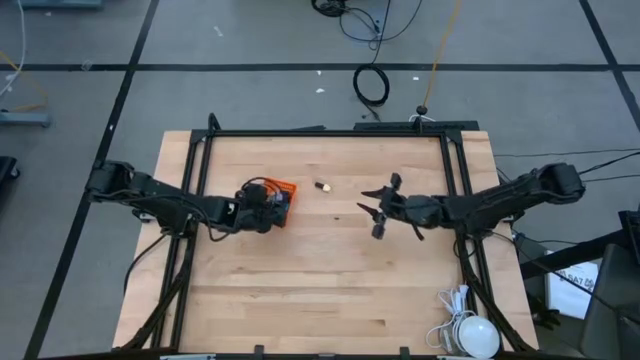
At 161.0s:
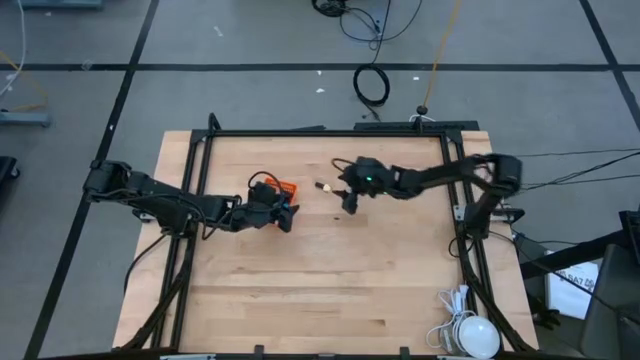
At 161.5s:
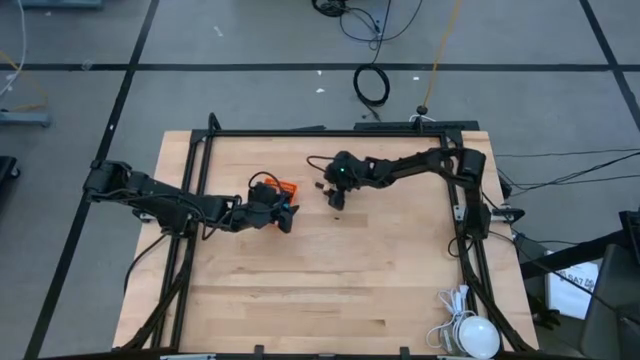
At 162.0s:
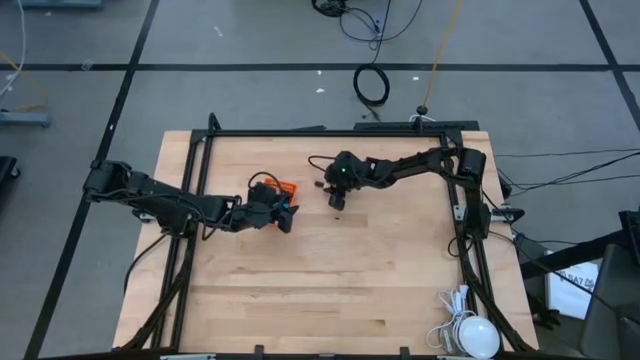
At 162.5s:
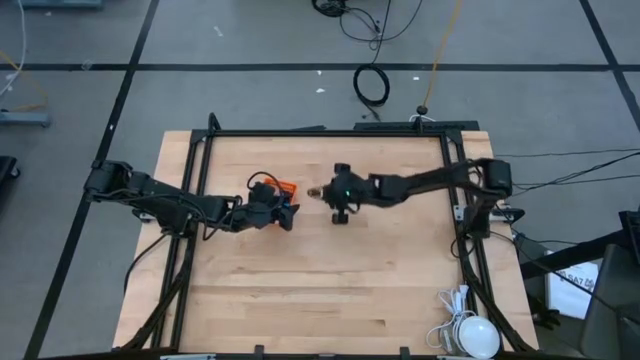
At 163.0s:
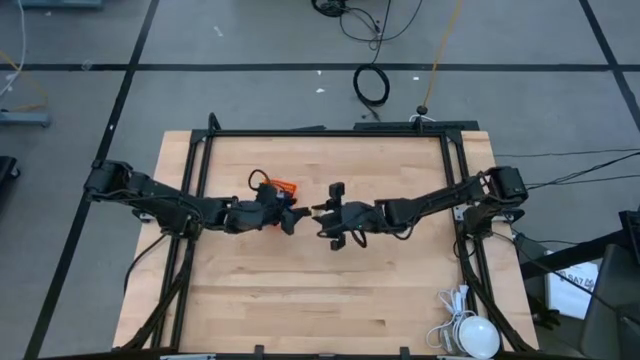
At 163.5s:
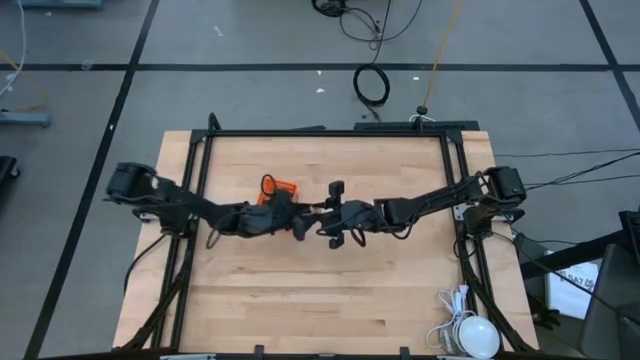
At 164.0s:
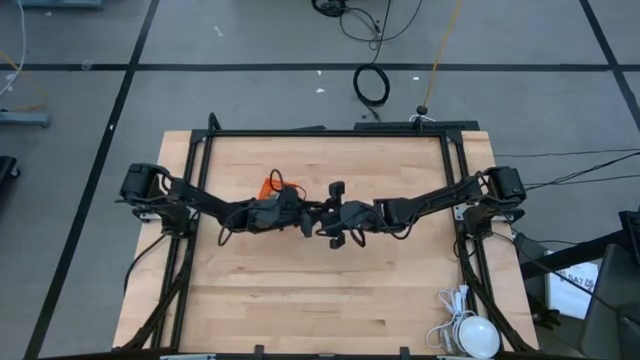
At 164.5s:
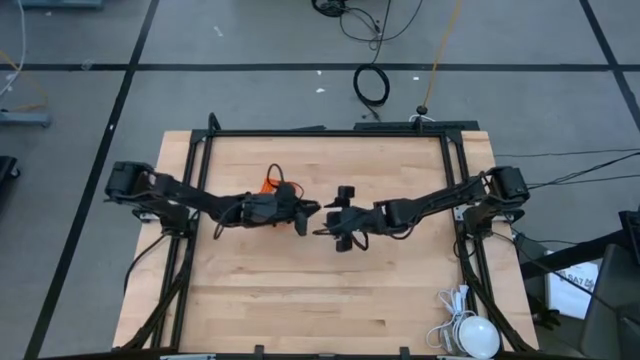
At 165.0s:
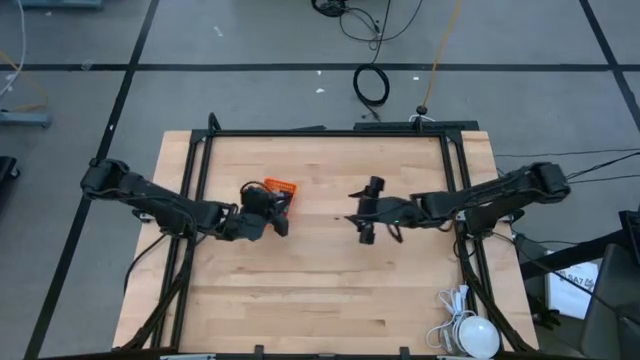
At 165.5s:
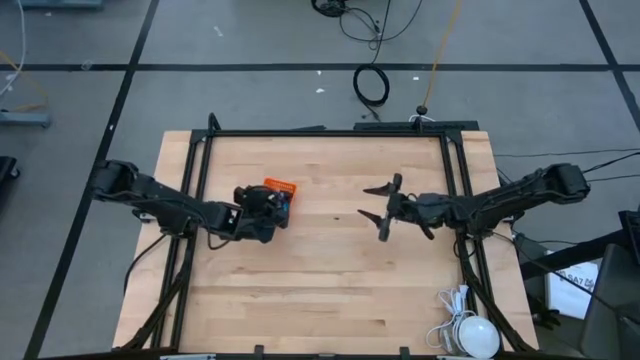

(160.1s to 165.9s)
Task: Pick & Place Nail Polish
Put the yellow nail polish into the orange basket

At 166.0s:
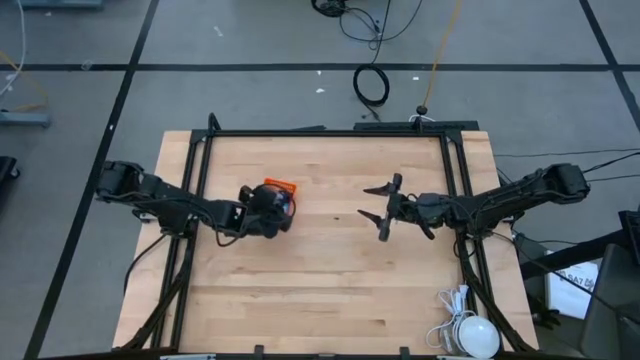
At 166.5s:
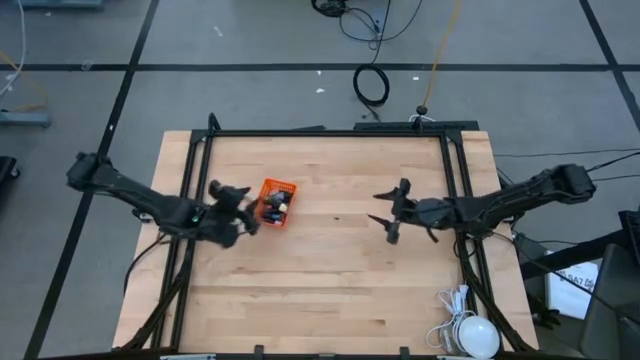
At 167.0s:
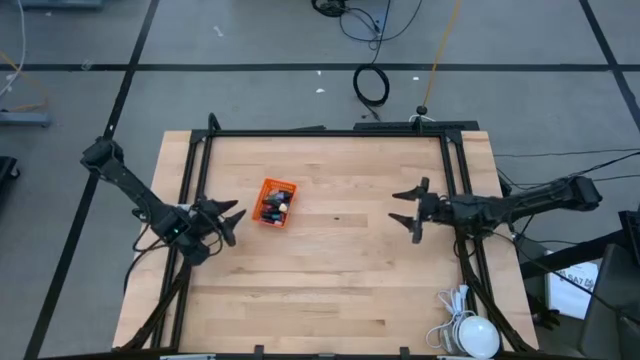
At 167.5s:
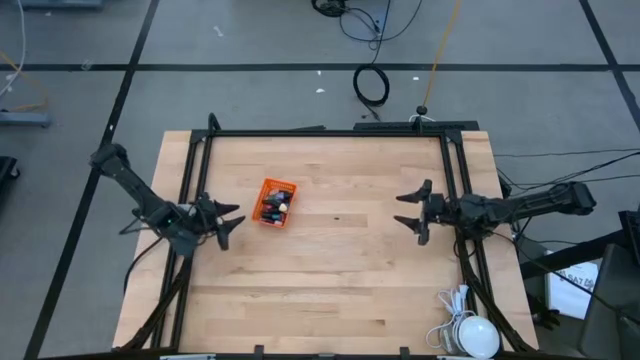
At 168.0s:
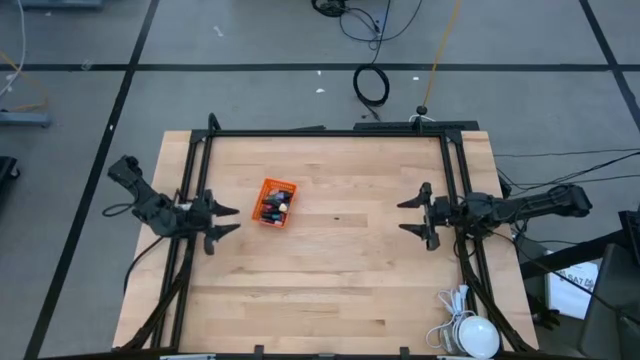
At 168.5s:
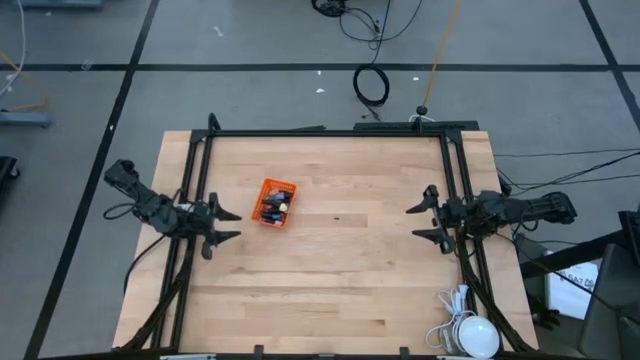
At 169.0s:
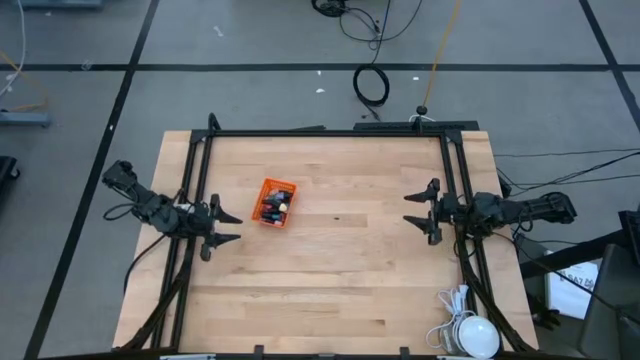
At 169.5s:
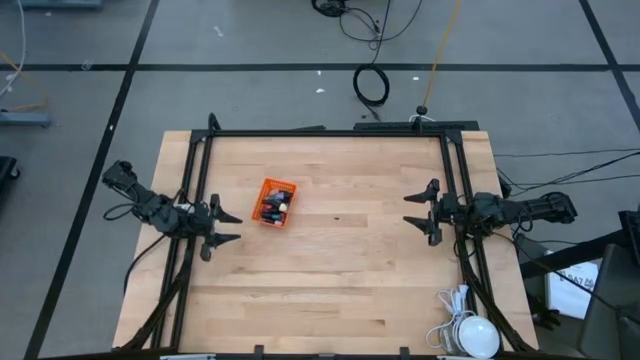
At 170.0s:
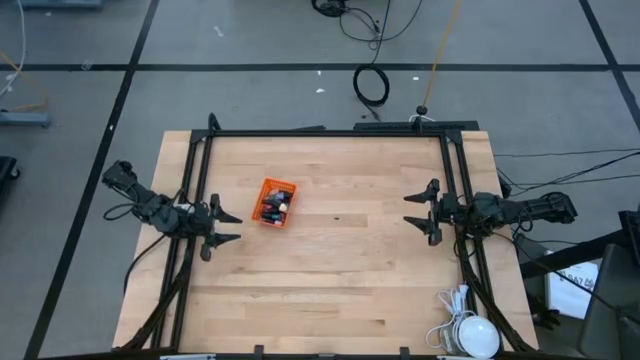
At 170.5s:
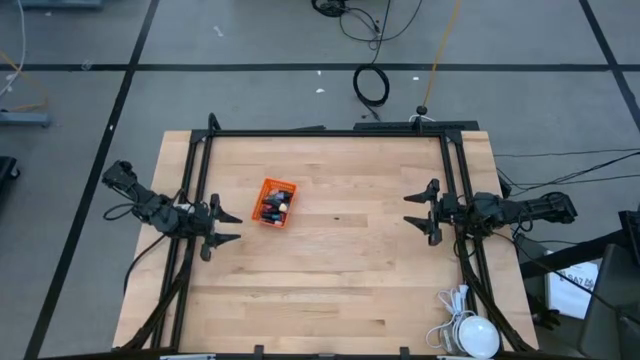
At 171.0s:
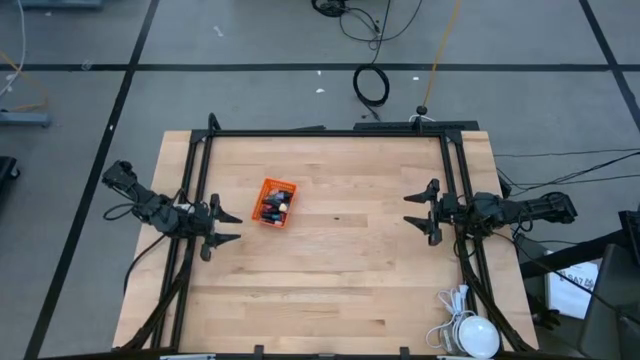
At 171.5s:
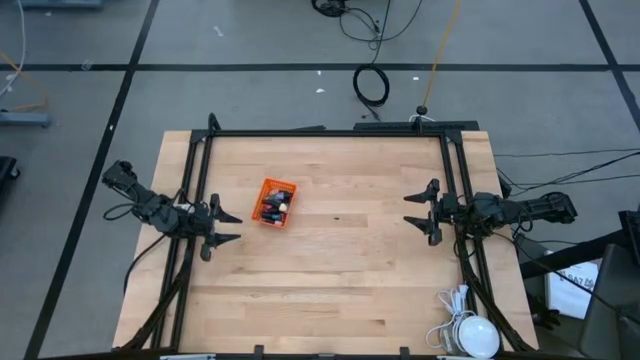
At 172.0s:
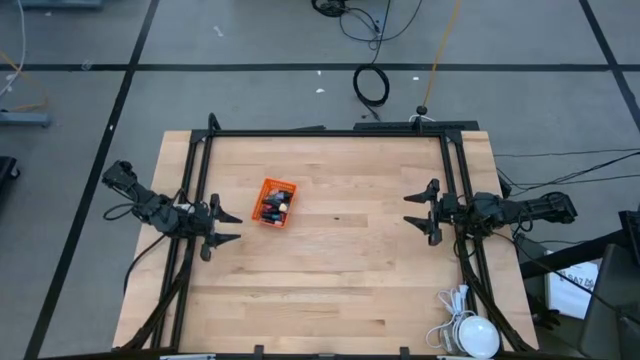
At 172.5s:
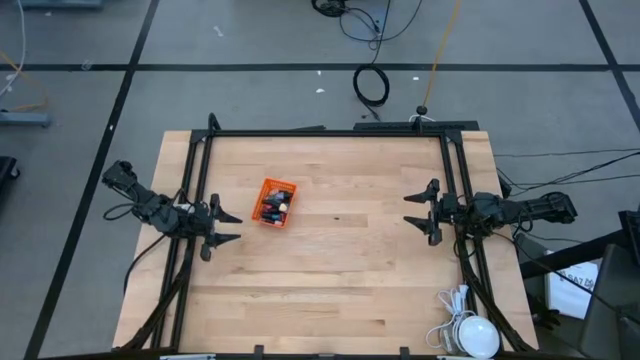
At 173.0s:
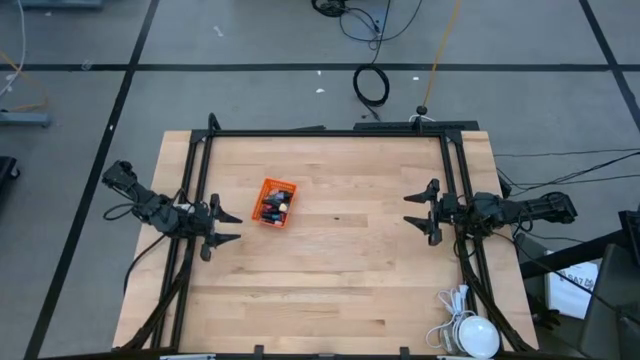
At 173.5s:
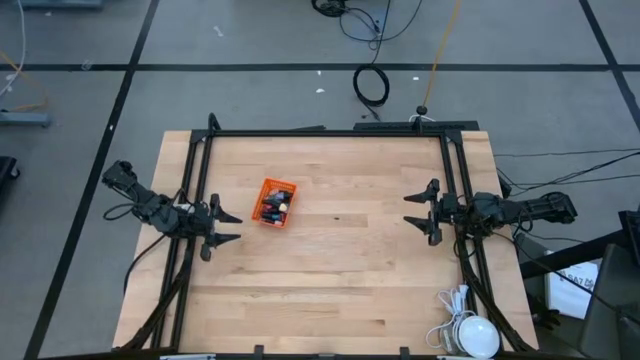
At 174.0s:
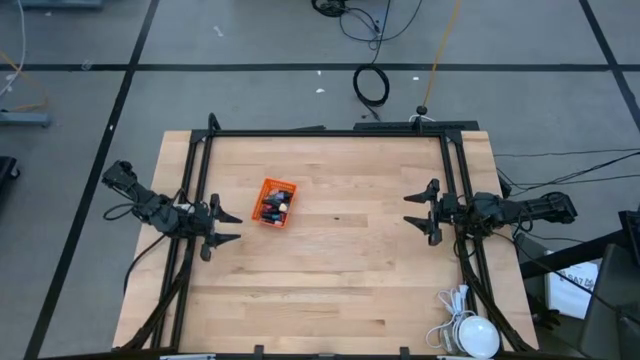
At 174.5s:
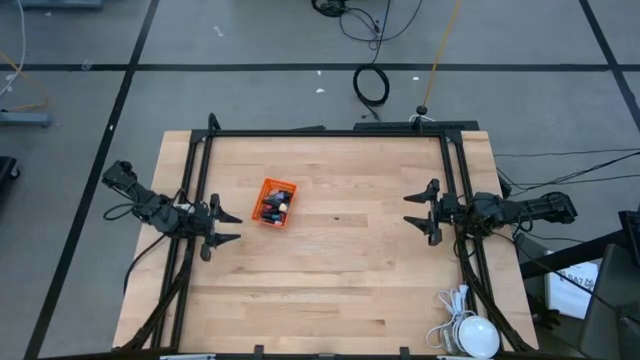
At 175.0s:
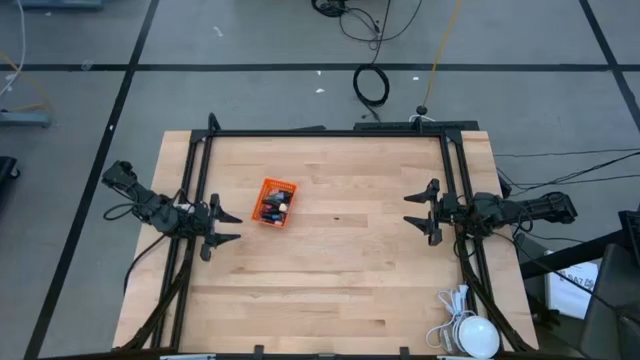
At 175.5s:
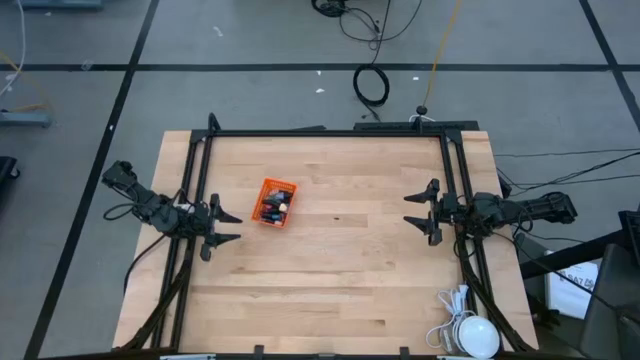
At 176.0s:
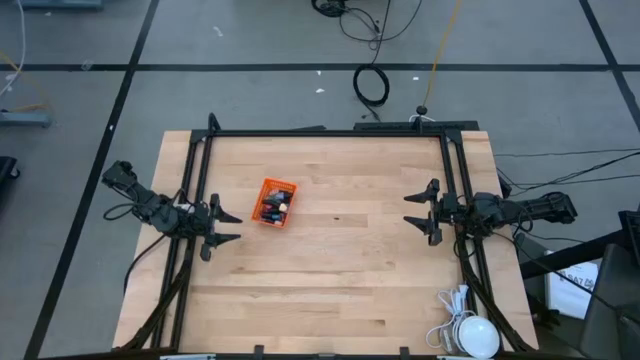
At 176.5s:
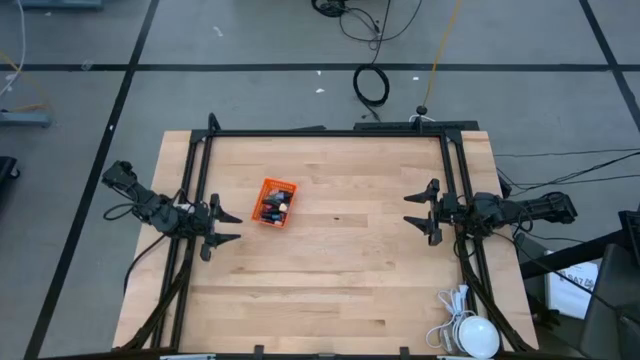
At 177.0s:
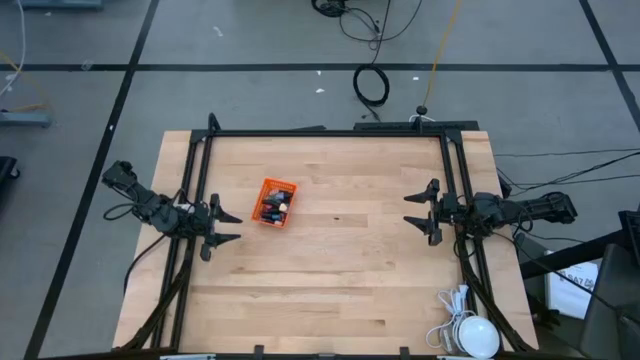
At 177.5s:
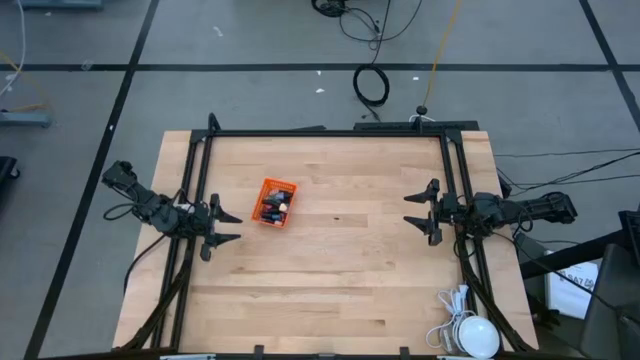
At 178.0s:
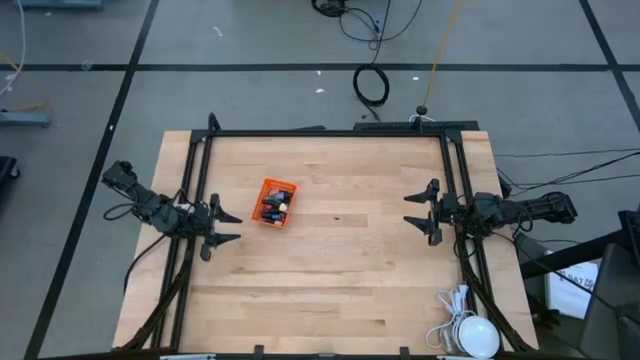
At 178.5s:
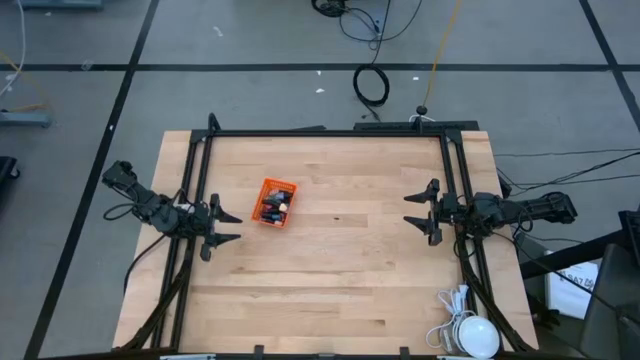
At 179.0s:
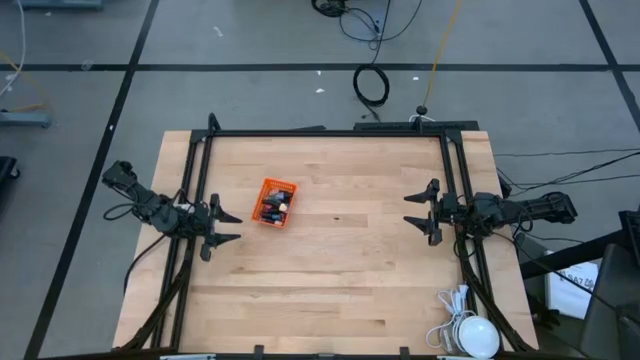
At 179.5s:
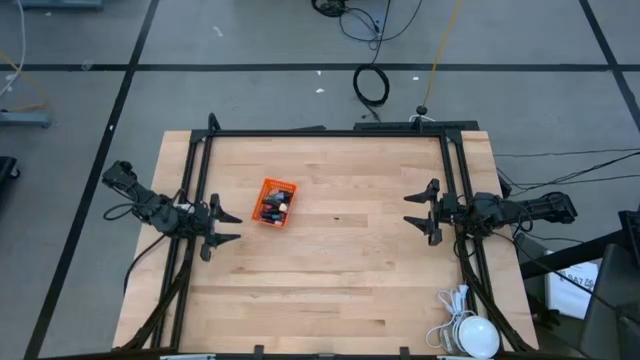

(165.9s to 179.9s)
Return to Home Position
